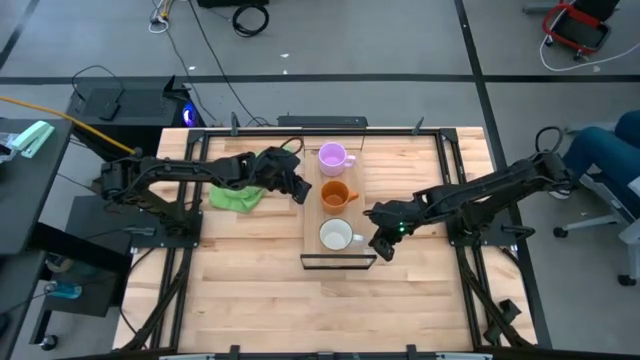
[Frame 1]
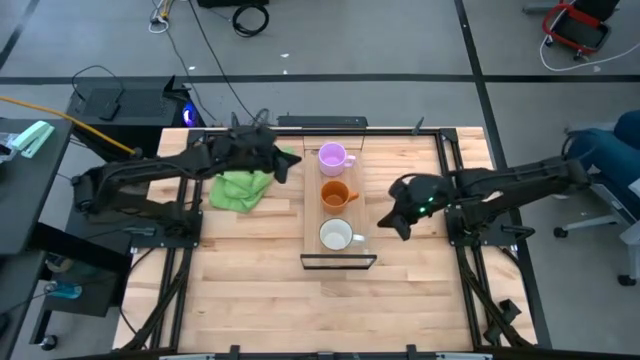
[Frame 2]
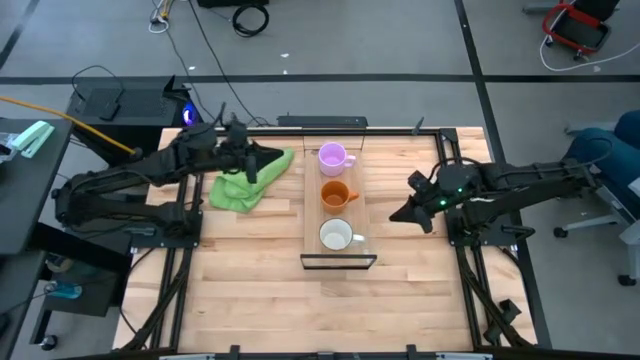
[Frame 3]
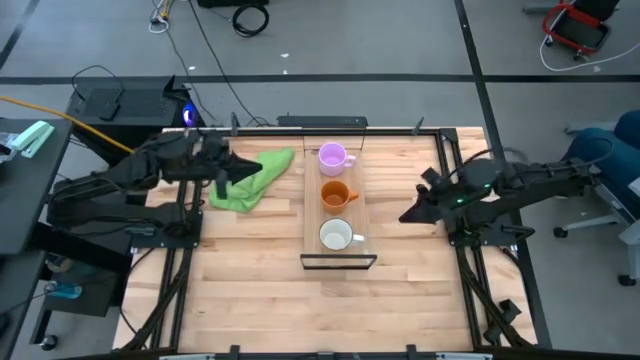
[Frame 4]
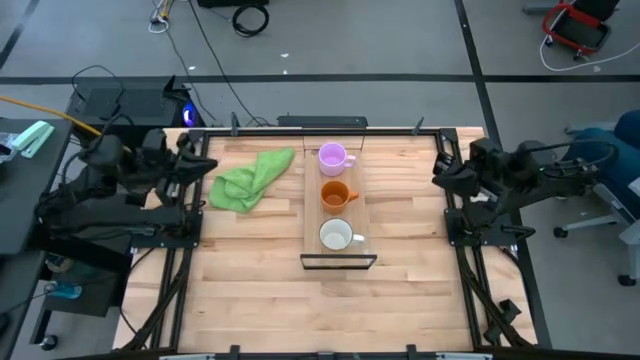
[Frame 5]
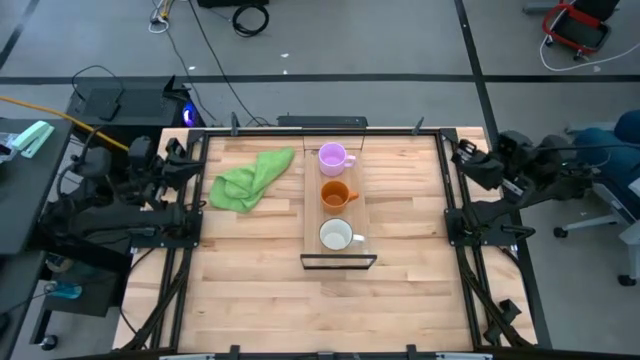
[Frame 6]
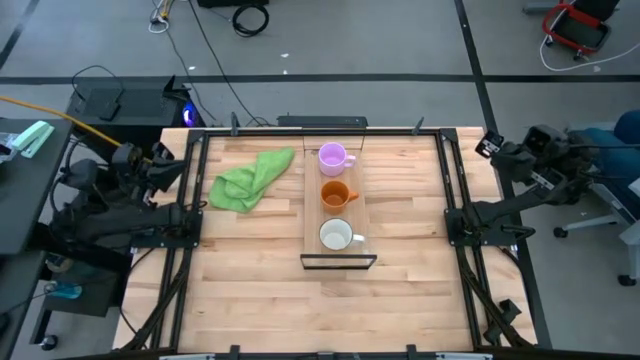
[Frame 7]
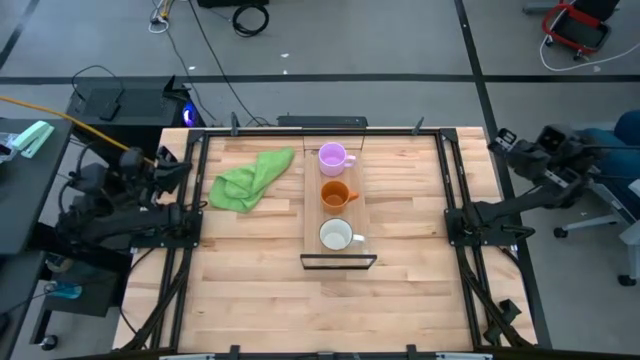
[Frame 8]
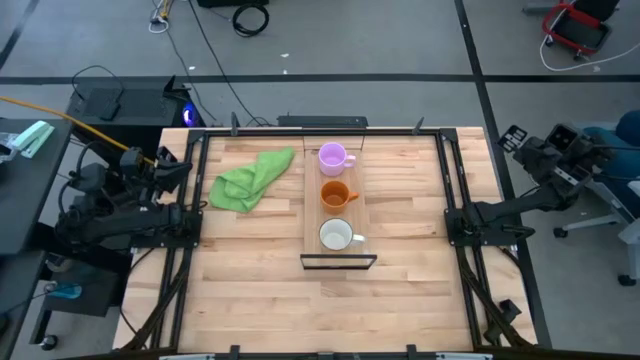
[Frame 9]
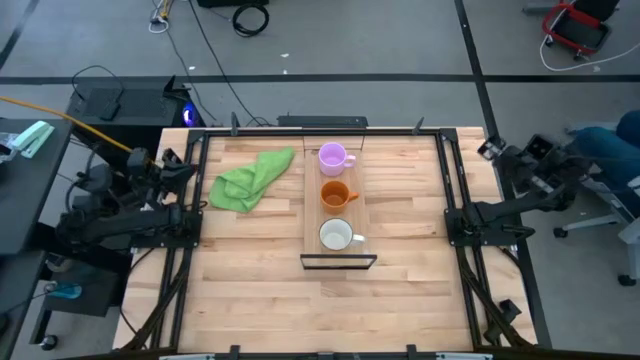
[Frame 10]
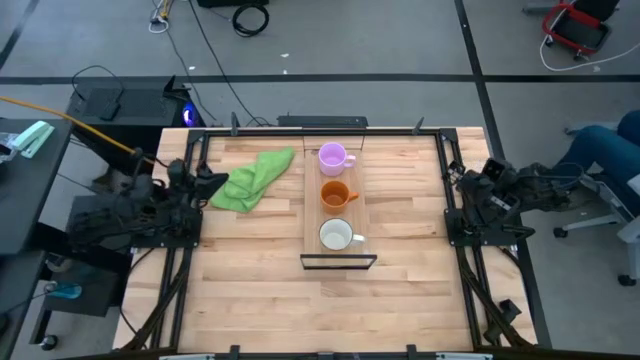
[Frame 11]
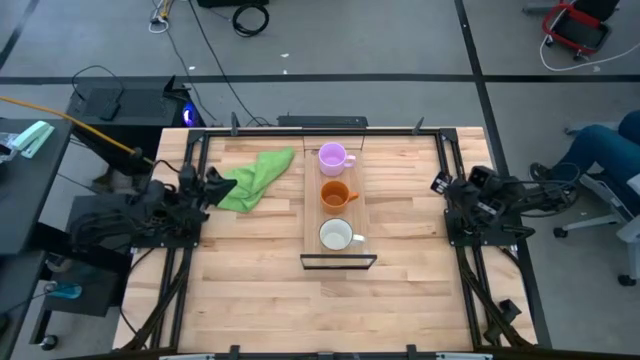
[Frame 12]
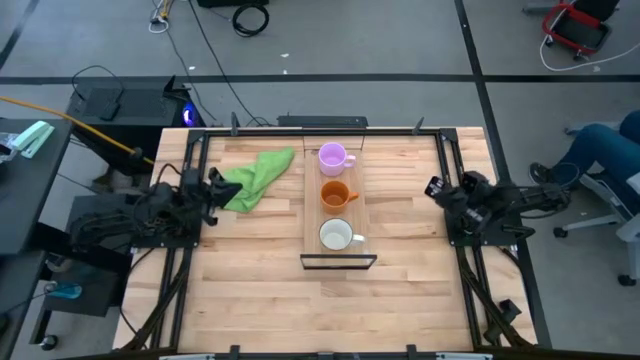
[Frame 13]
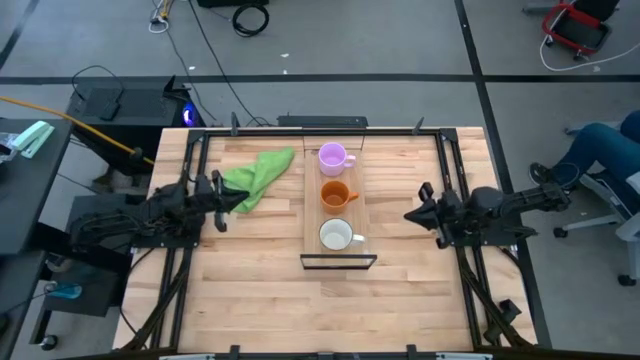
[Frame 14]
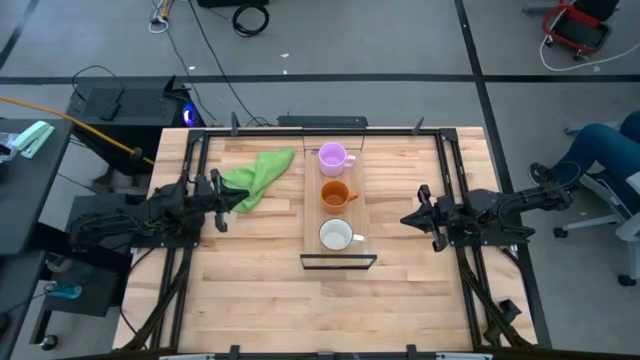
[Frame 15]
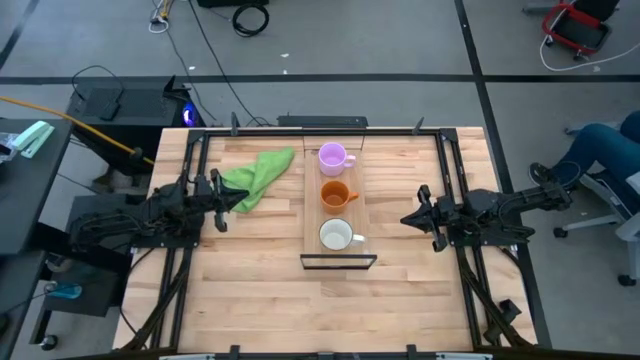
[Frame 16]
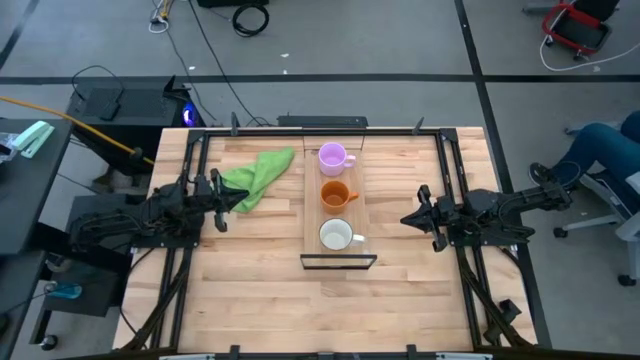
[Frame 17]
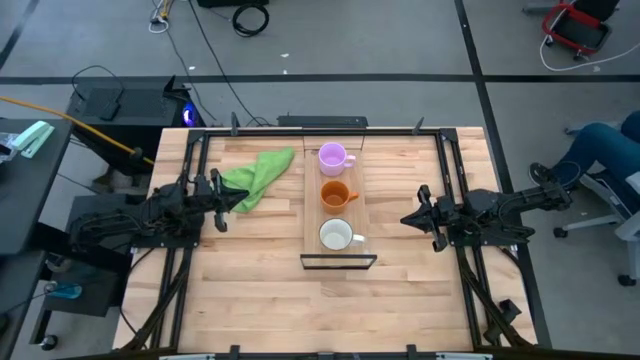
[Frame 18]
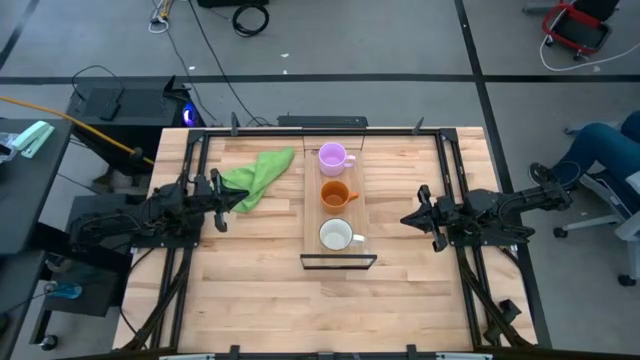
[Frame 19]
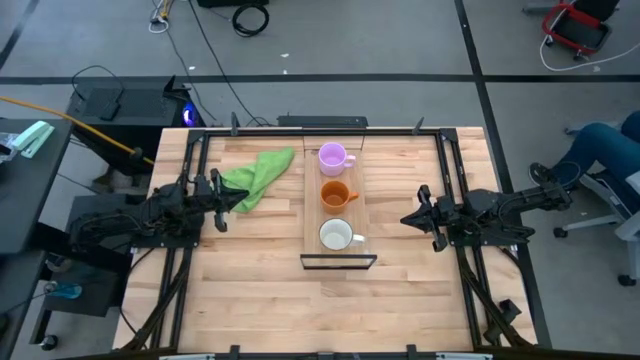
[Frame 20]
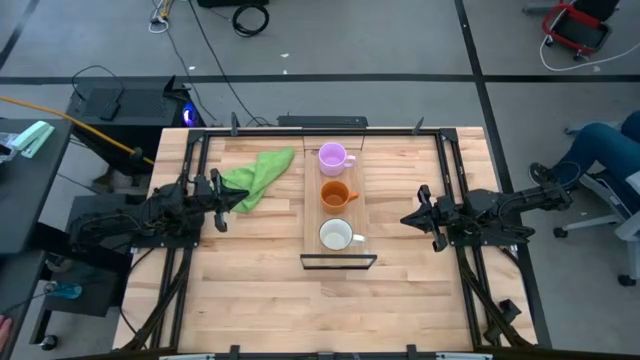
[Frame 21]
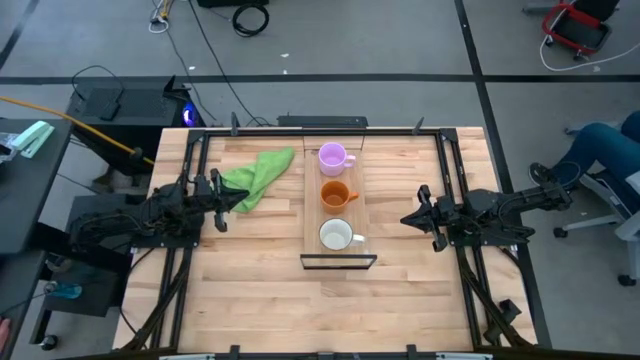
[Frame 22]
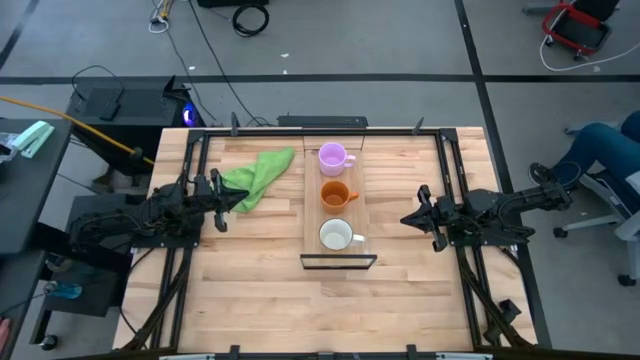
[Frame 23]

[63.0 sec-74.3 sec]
Task: Stack small to large cups/mugs on shelf
Return to Home Position

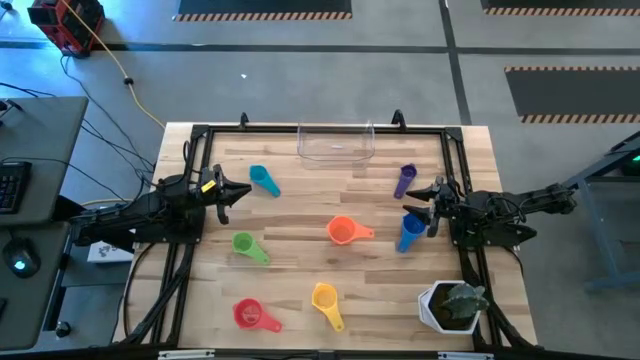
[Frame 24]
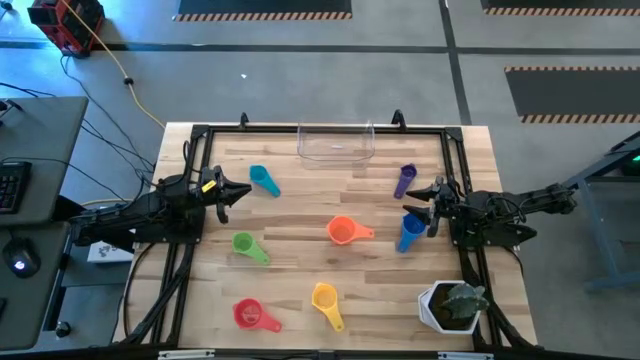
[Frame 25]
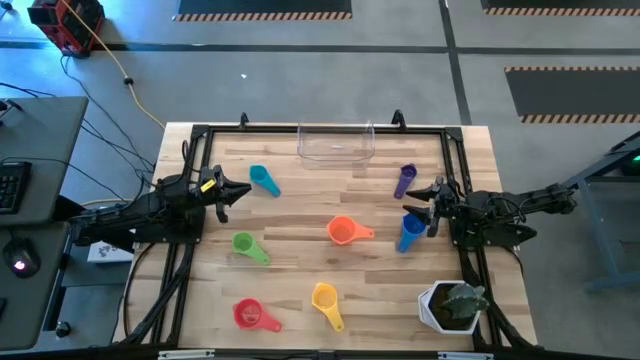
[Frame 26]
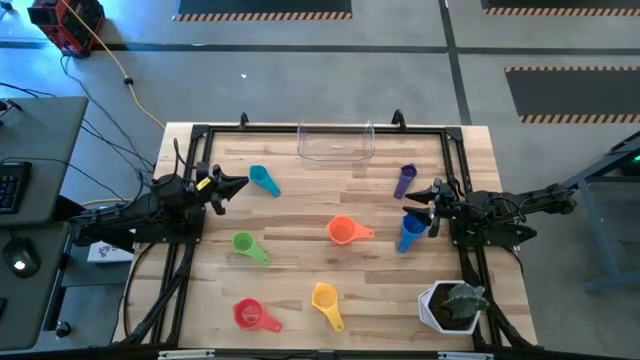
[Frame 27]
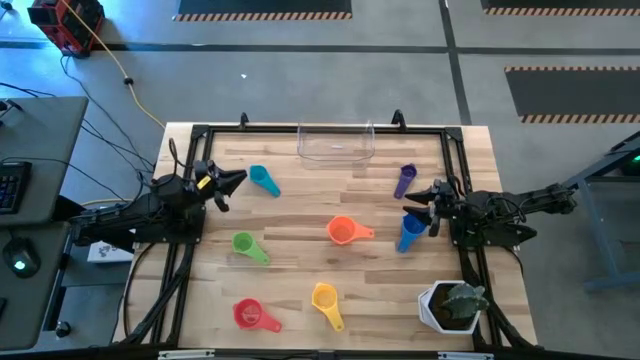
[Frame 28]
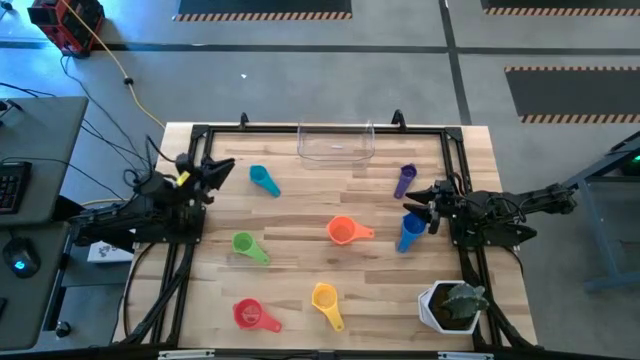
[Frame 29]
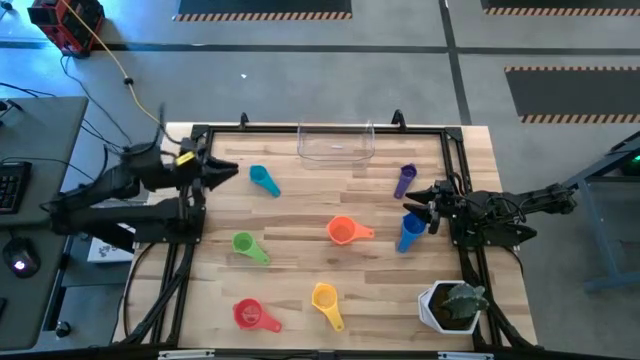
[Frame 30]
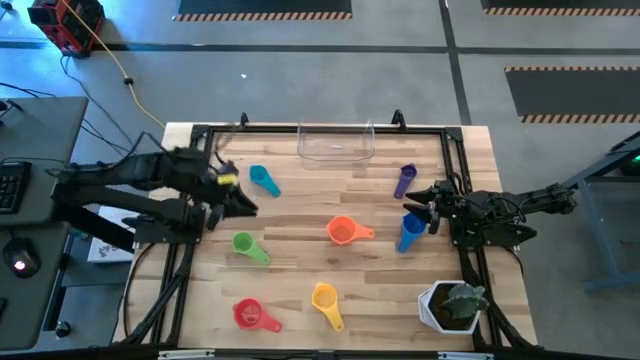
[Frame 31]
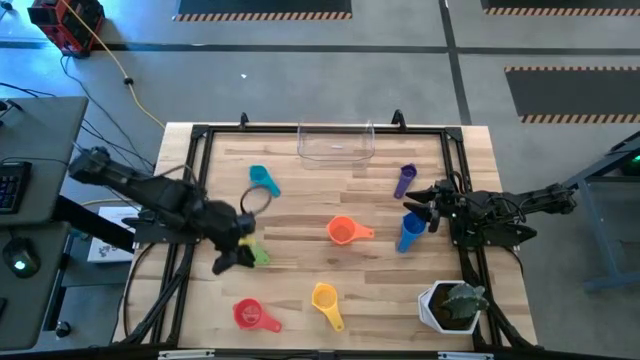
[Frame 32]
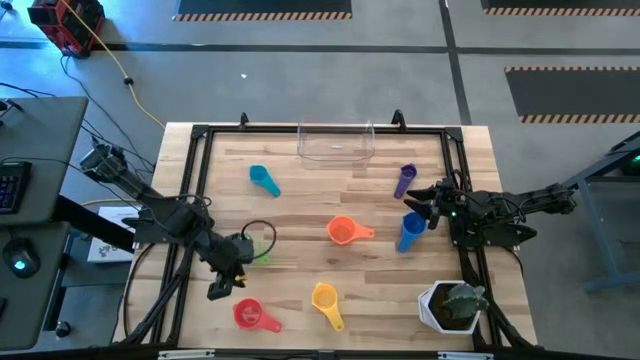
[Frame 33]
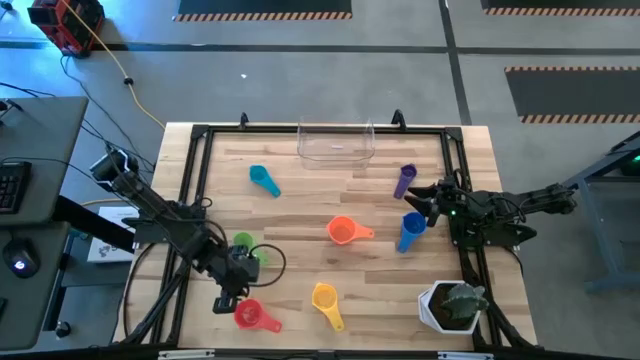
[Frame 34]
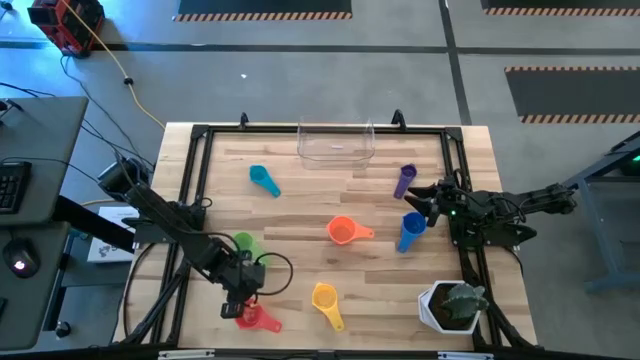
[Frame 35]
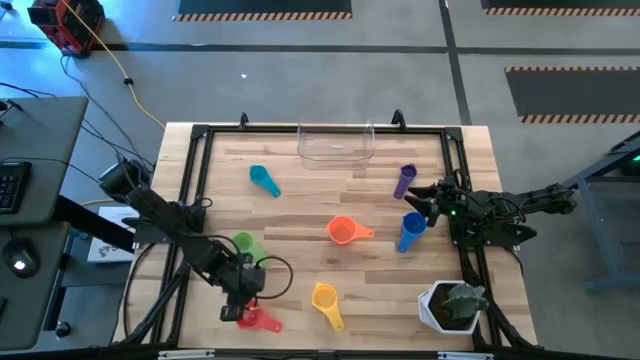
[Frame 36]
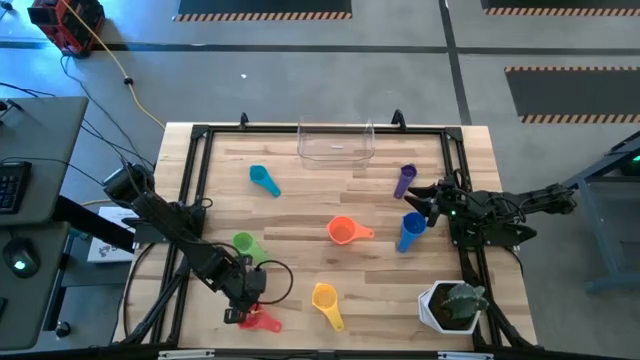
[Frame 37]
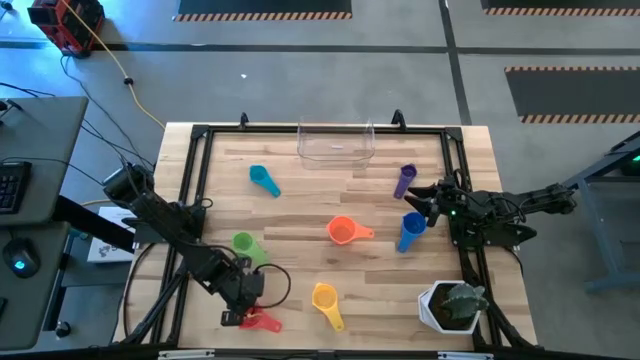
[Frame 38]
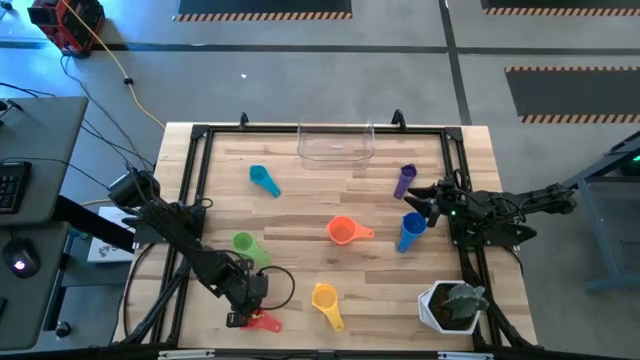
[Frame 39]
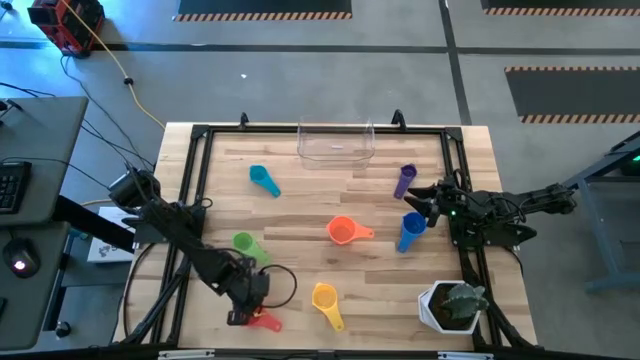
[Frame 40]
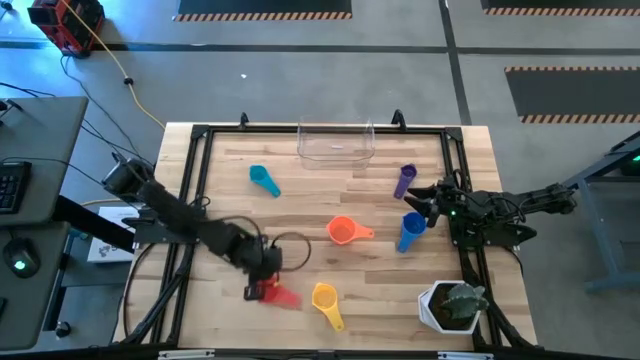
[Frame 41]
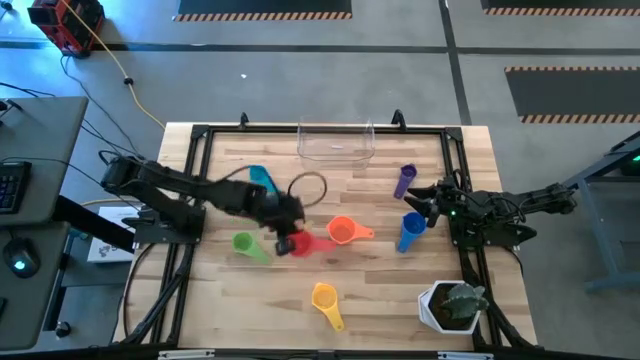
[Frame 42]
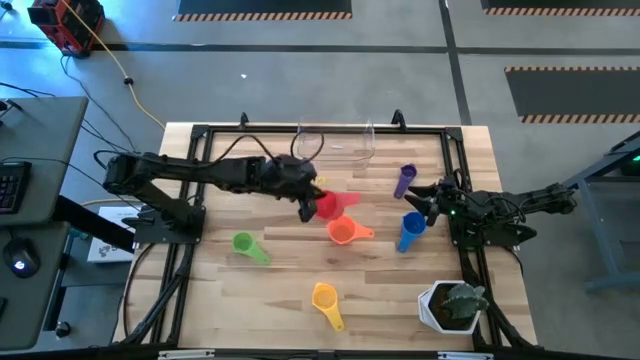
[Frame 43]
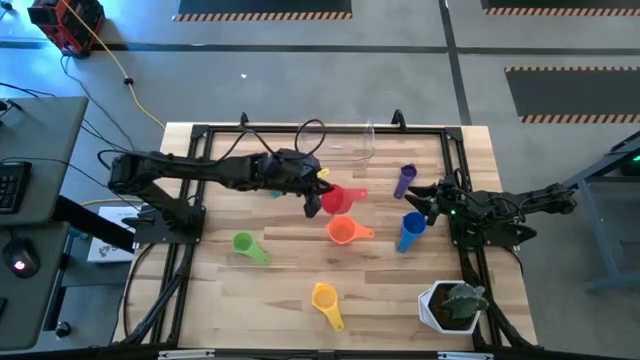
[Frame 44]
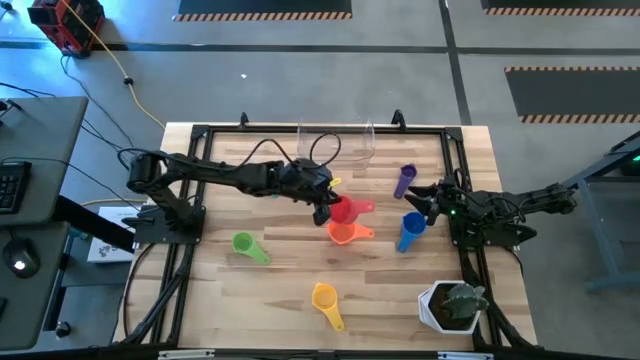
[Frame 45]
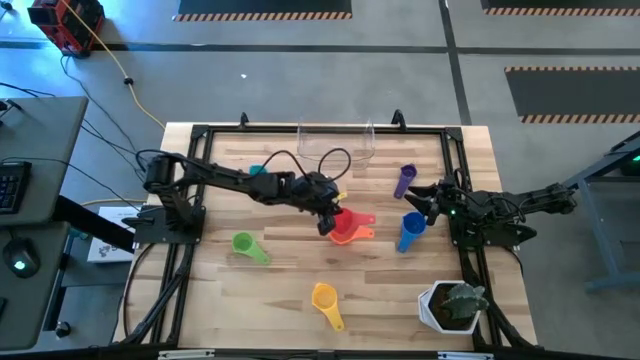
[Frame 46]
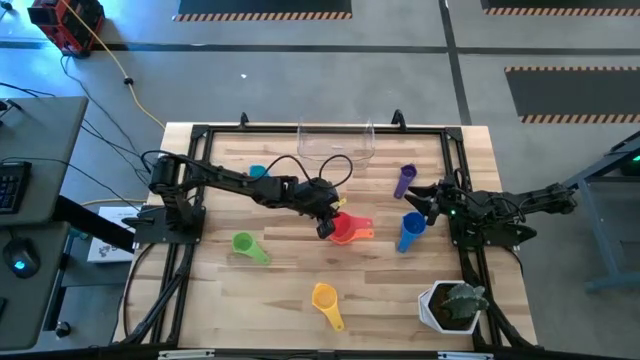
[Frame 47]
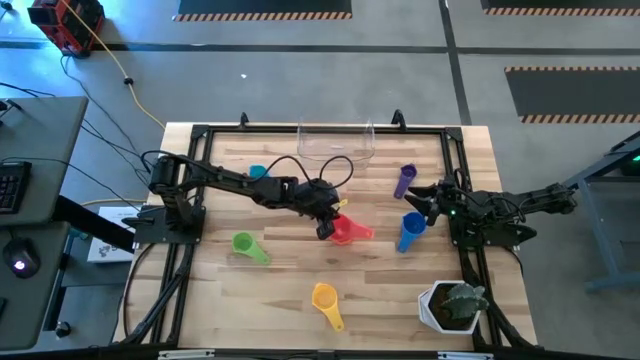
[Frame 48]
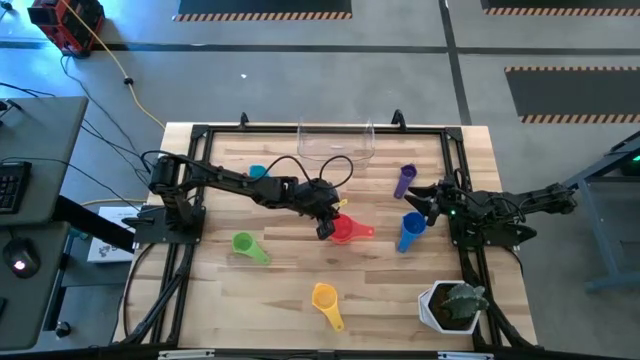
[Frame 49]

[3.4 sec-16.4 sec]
Task: Nest measuring cups in basket
Stack the red measuring cup on top of the orange measuring cup
